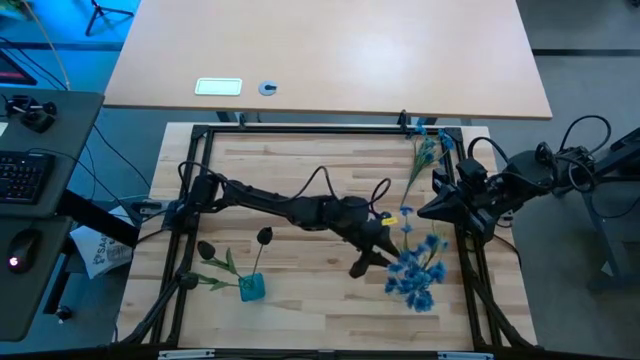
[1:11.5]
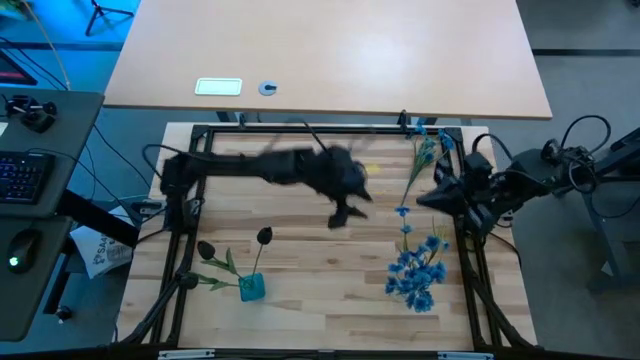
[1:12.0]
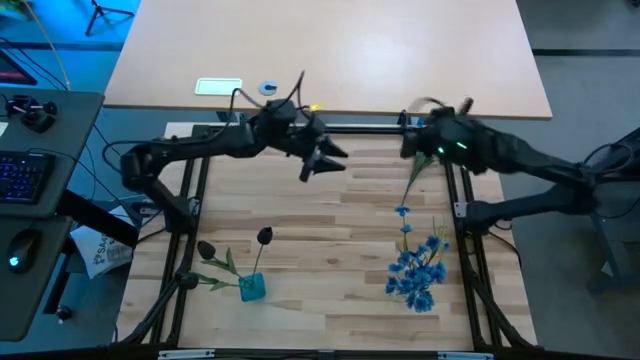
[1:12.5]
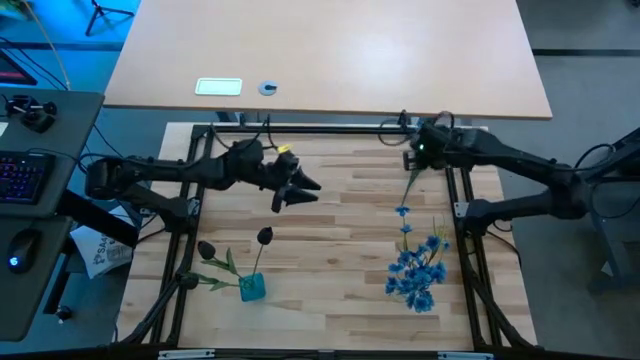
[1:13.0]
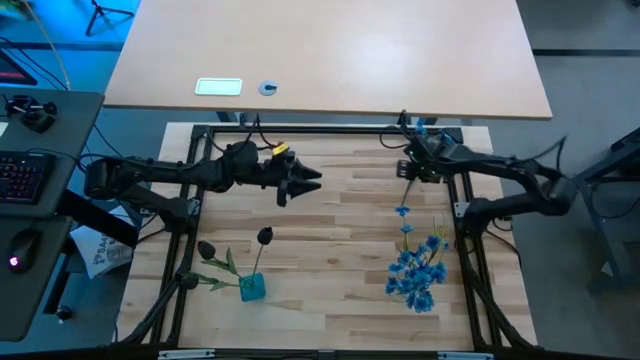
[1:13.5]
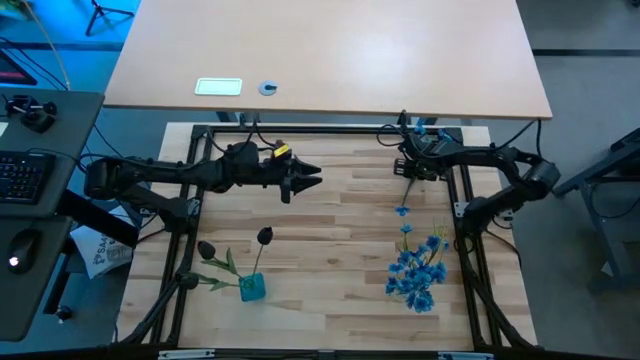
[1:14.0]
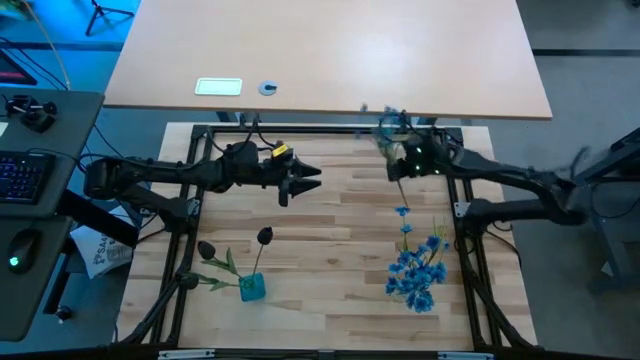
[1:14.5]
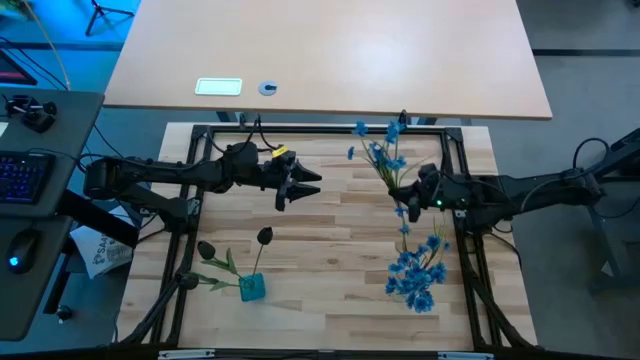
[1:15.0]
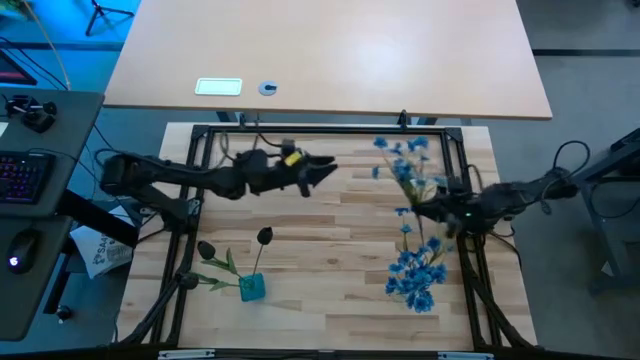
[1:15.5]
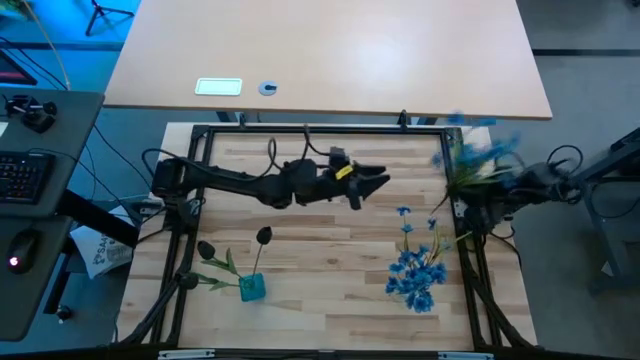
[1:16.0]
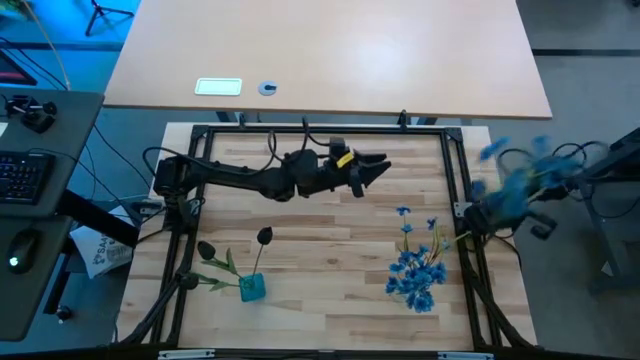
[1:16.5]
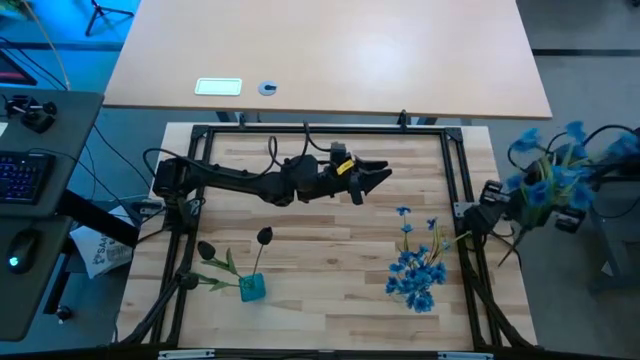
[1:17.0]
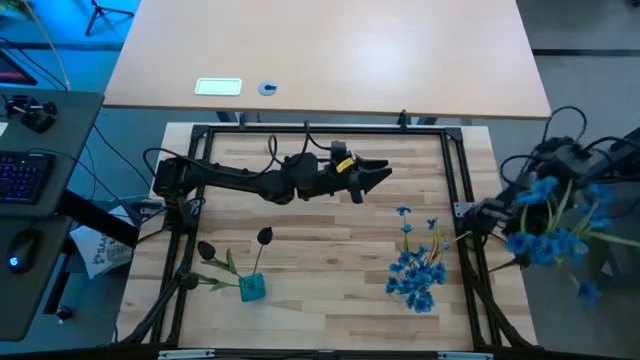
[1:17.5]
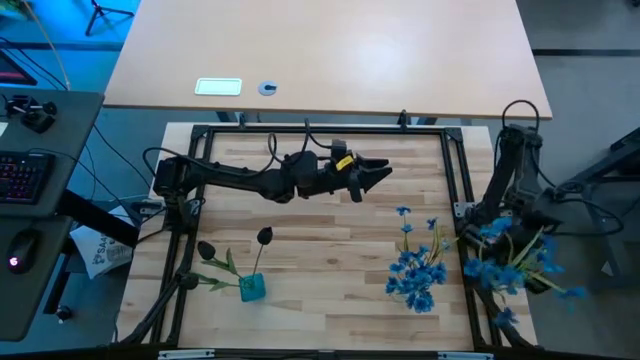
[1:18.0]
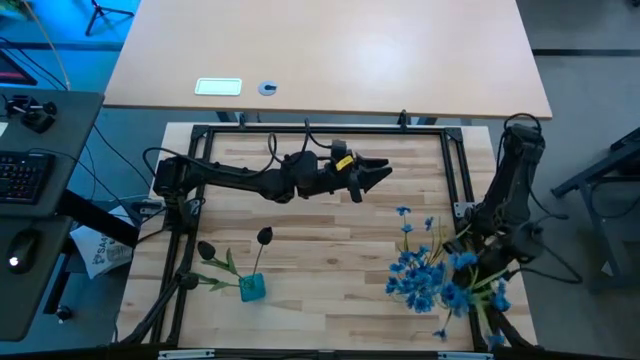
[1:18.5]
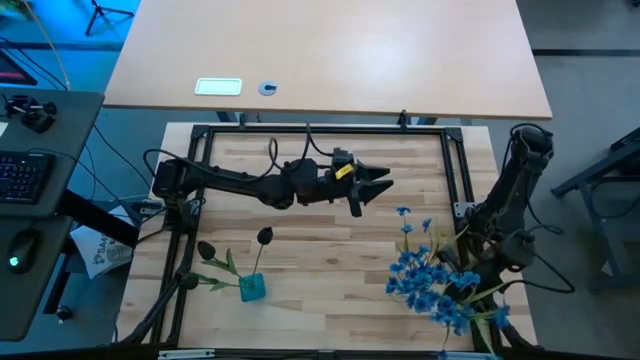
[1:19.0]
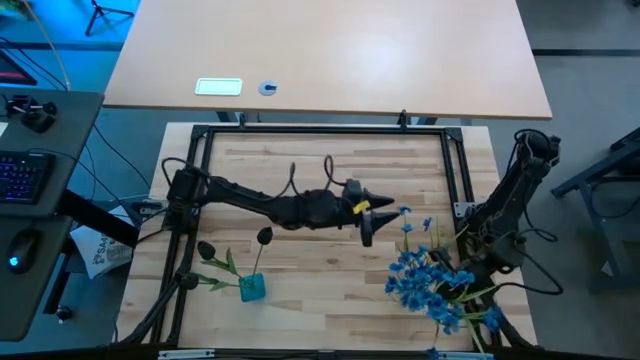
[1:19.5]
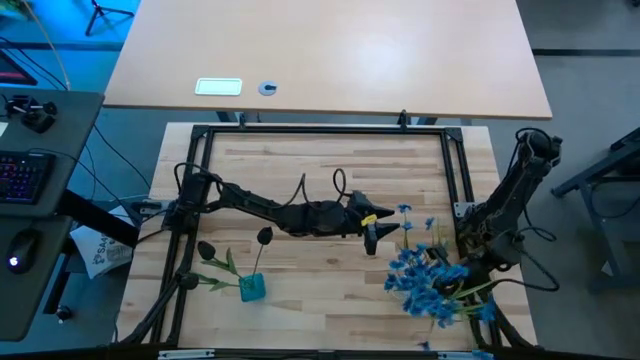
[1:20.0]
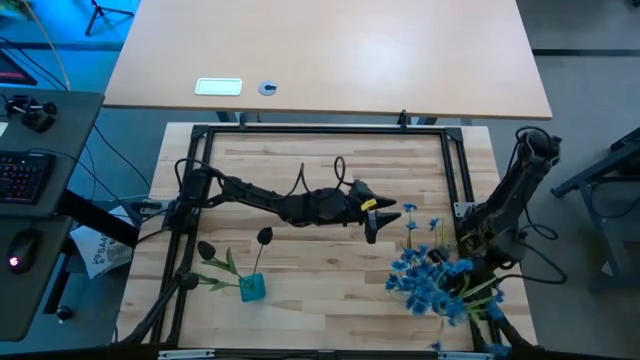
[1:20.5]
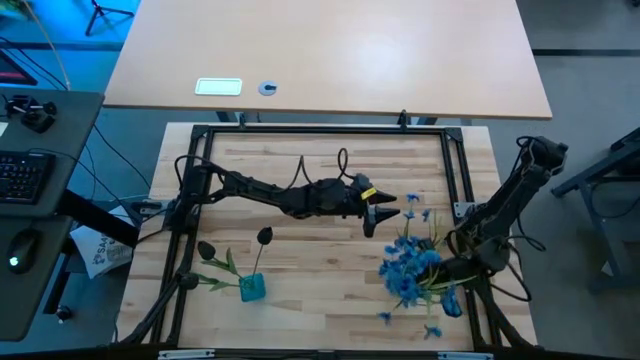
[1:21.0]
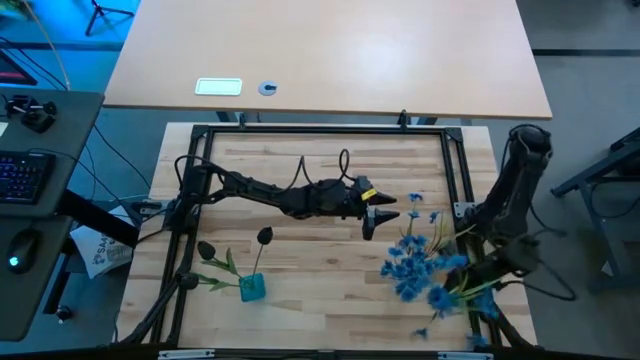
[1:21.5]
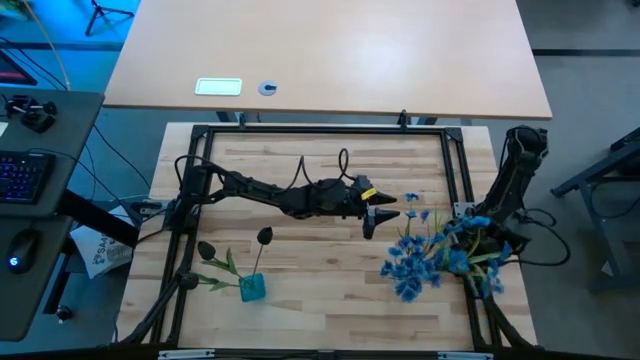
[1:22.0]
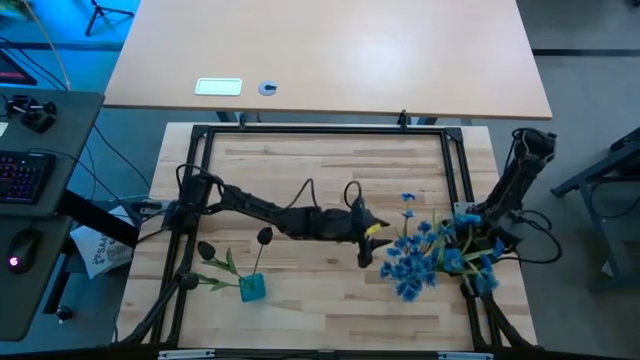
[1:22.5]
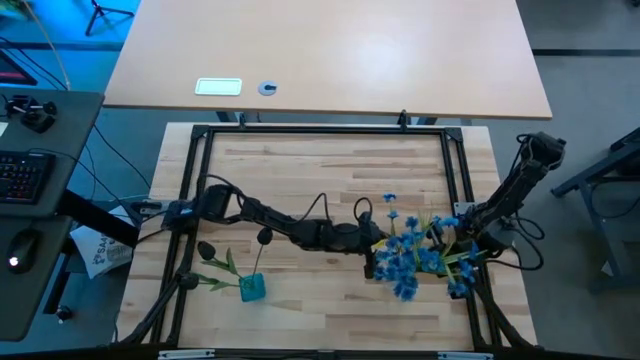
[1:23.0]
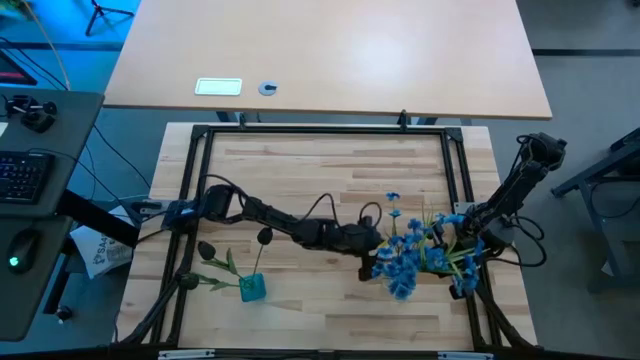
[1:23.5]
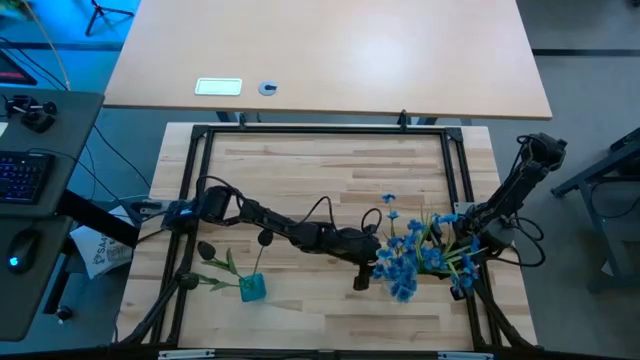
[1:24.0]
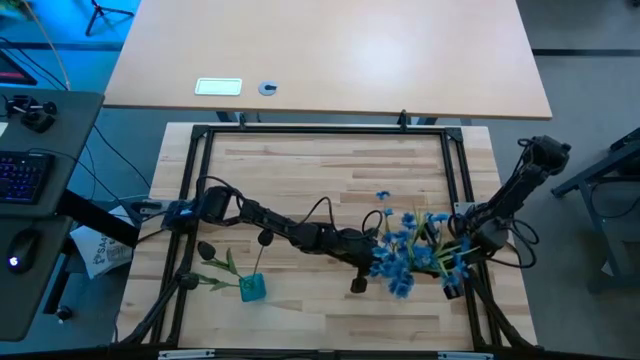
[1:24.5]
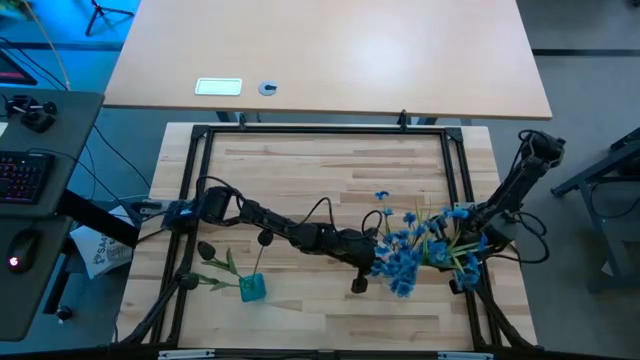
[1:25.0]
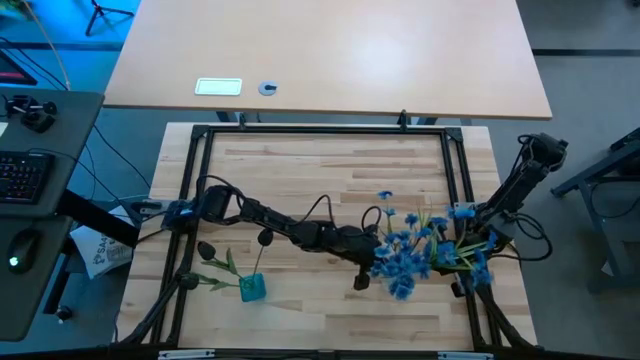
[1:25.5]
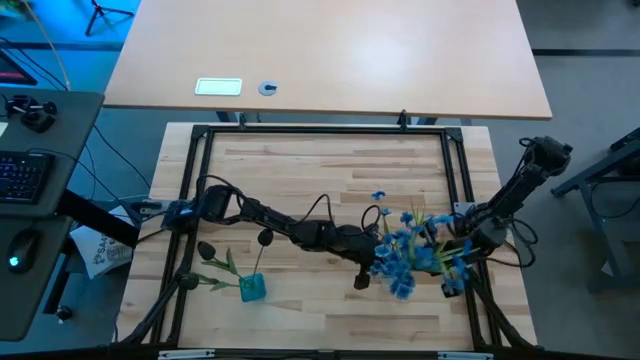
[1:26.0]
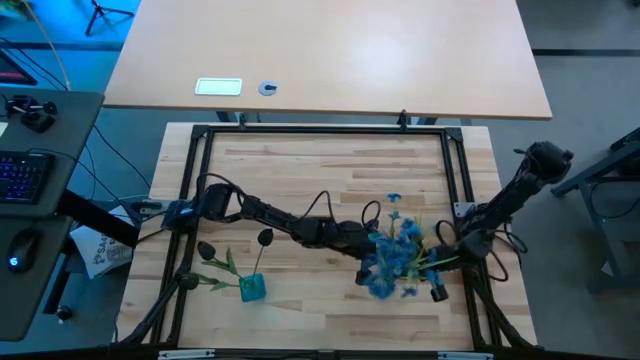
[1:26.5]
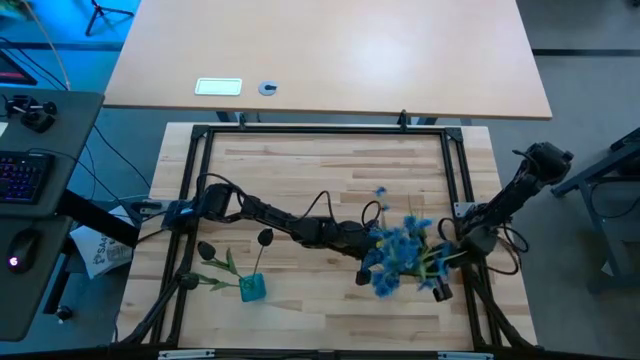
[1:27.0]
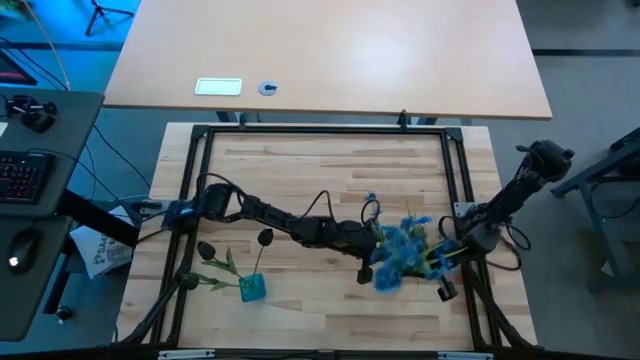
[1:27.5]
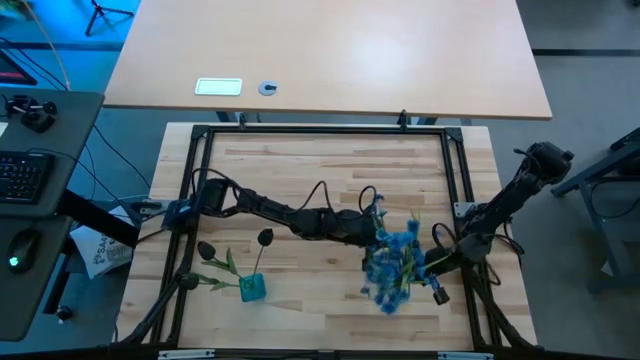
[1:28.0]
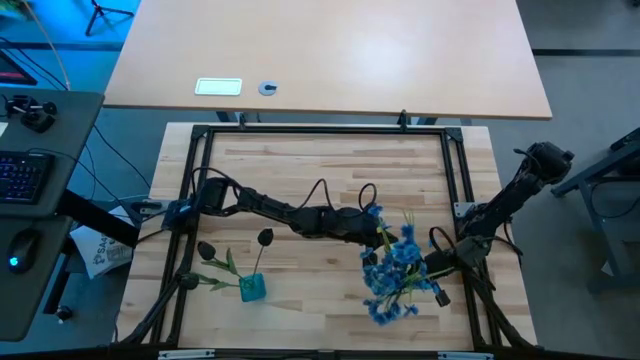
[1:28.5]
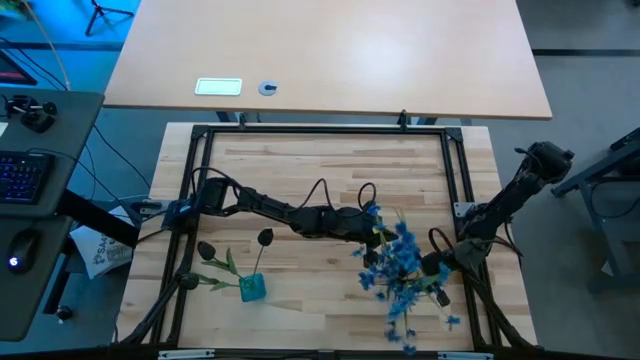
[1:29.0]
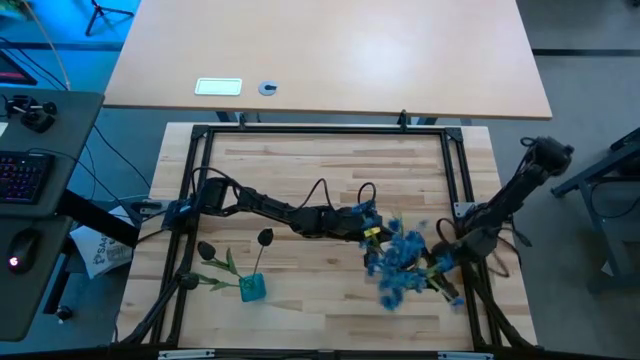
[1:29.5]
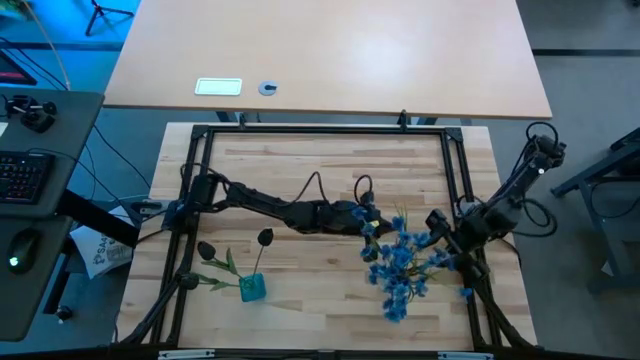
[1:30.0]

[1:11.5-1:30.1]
Task: Sort flowers into vase by color
Put the blue flowers into the transparent vase

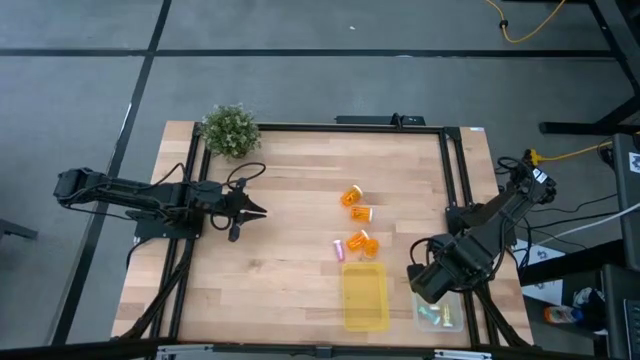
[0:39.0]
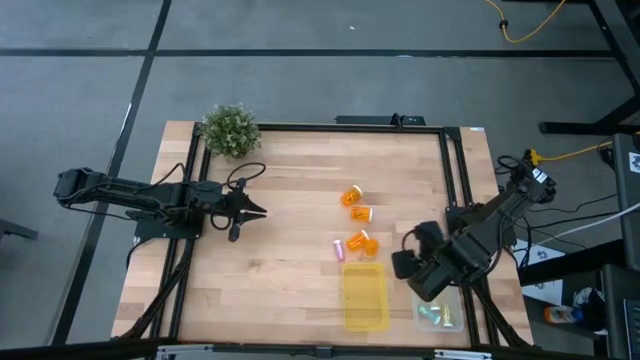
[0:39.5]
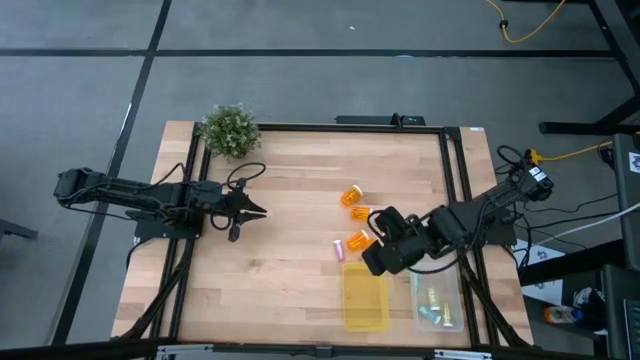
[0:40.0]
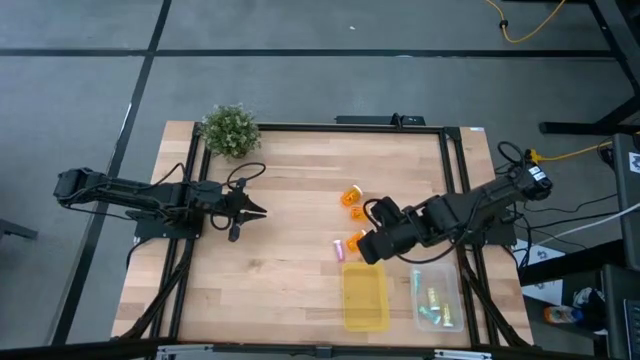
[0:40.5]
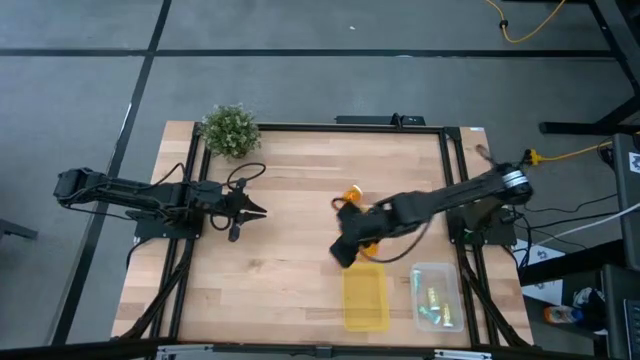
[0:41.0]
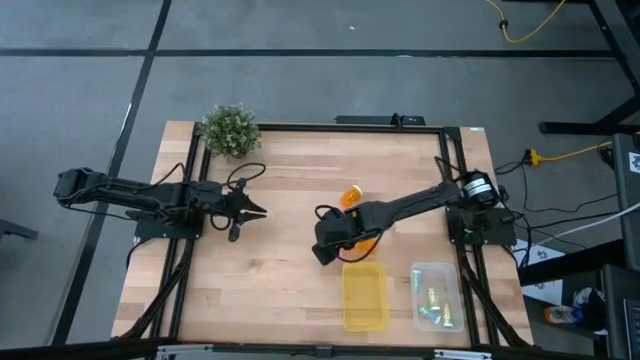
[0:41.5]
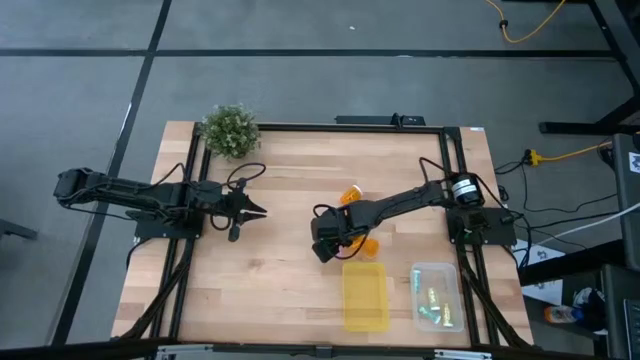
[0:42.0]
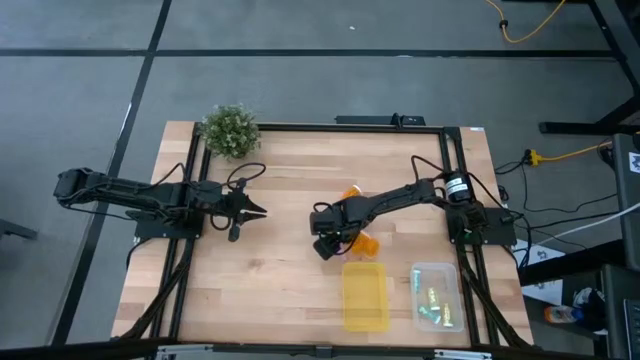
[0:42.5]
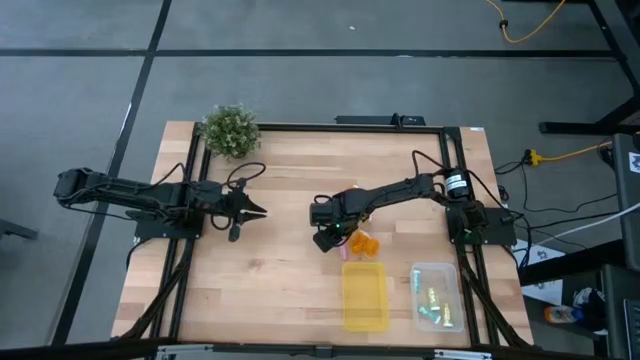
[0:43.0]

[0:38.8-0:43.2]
Task: Pick and place medicine bottles into bin by pill shape (circle, oval)
Put the pink tablet bottle into the transparent bin
